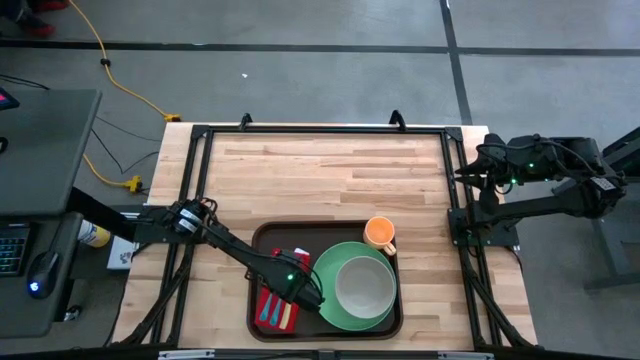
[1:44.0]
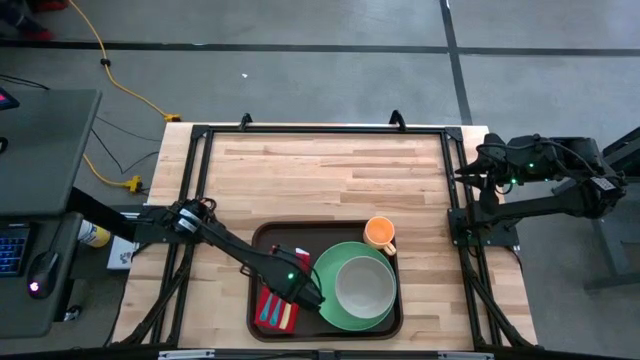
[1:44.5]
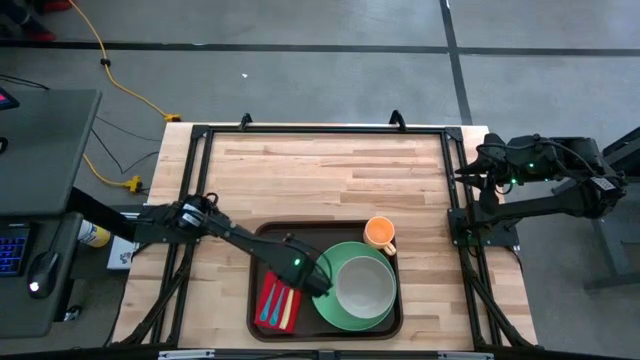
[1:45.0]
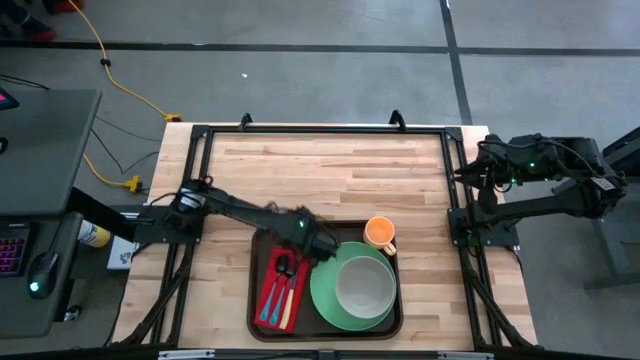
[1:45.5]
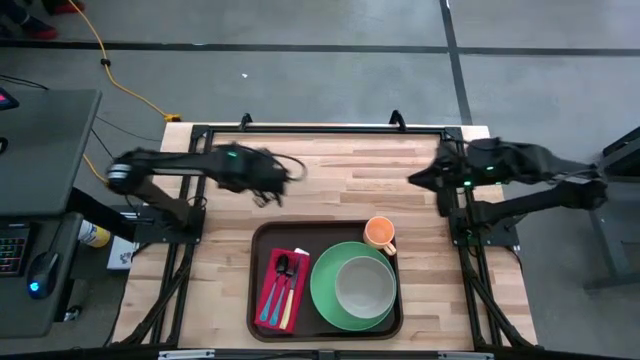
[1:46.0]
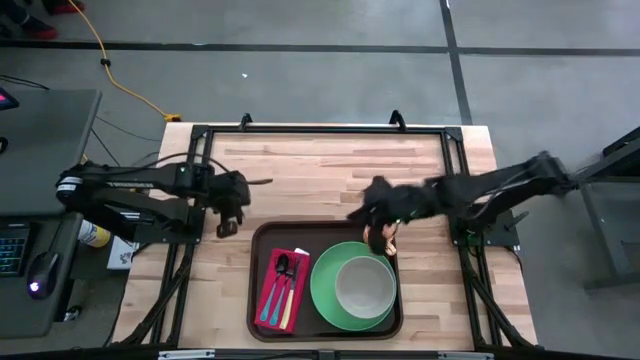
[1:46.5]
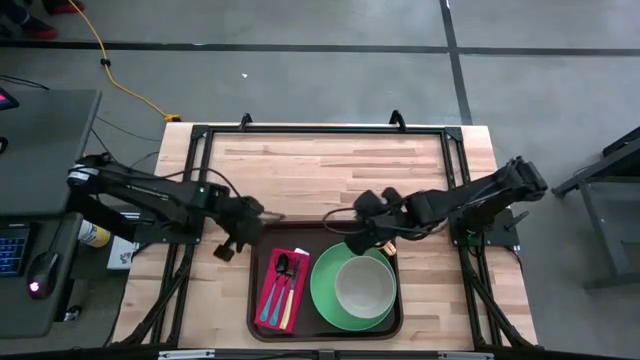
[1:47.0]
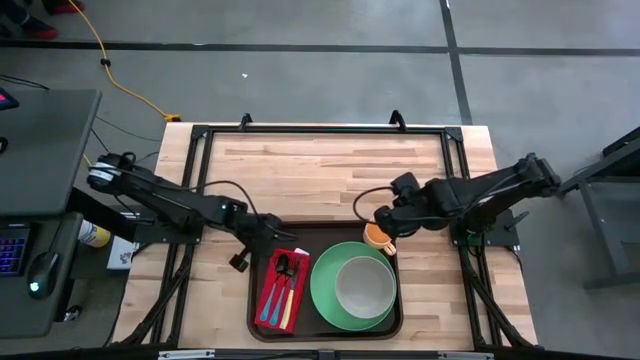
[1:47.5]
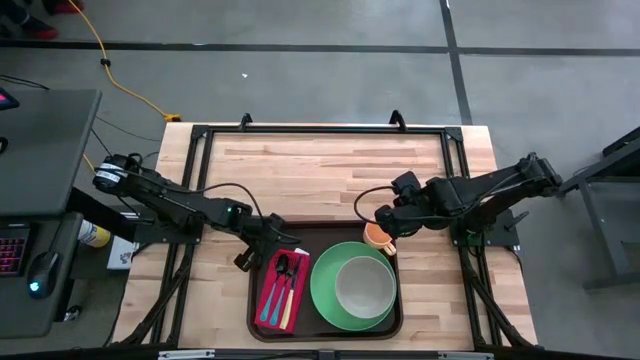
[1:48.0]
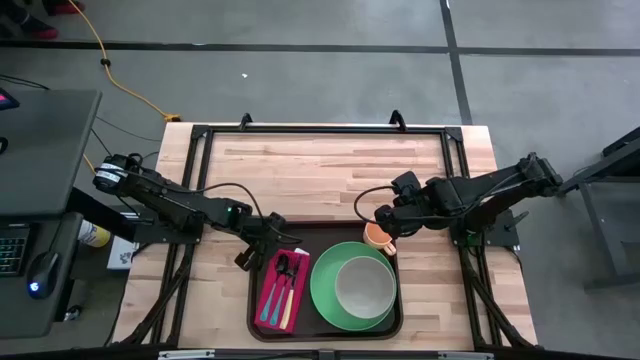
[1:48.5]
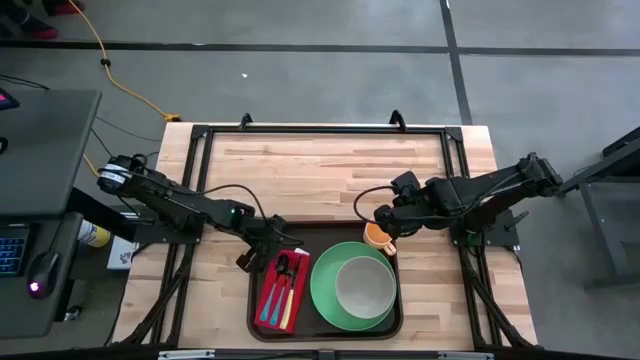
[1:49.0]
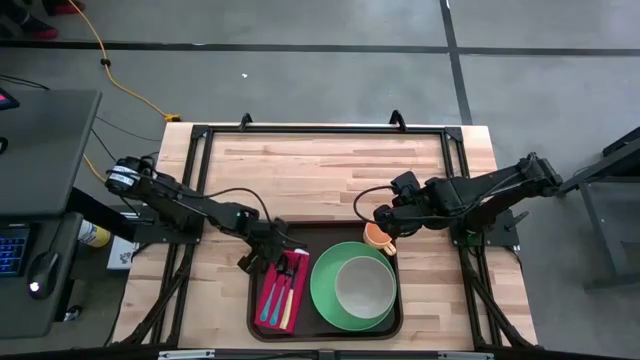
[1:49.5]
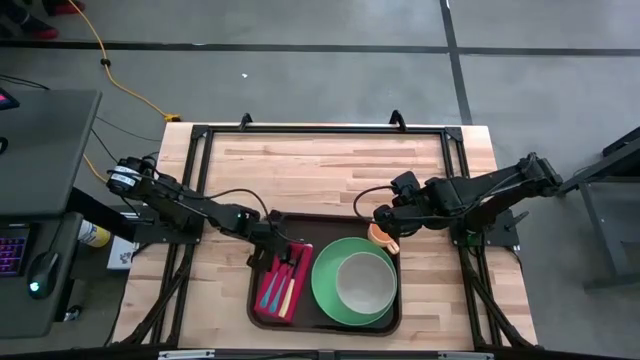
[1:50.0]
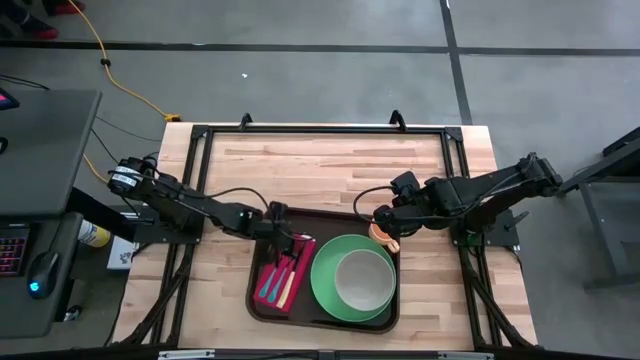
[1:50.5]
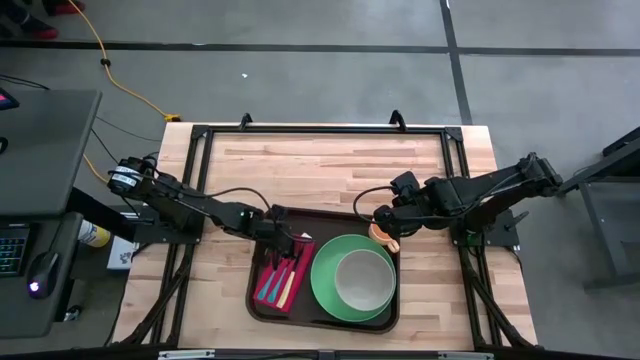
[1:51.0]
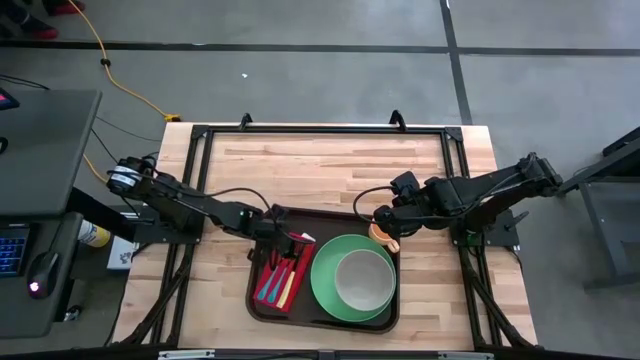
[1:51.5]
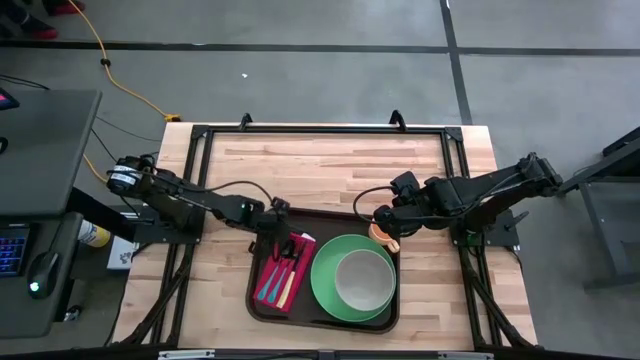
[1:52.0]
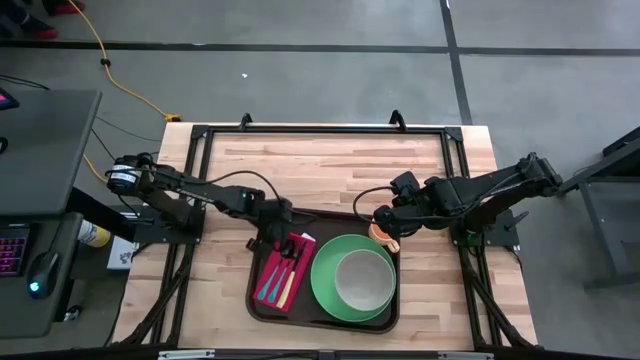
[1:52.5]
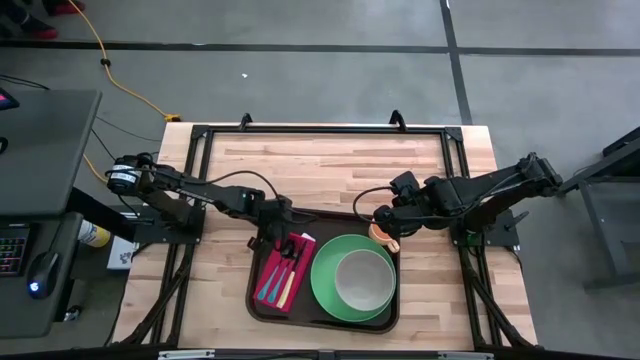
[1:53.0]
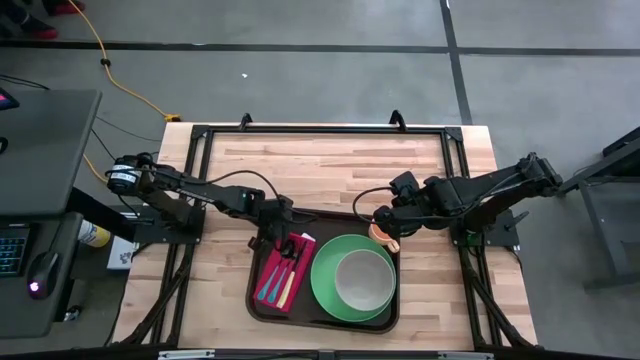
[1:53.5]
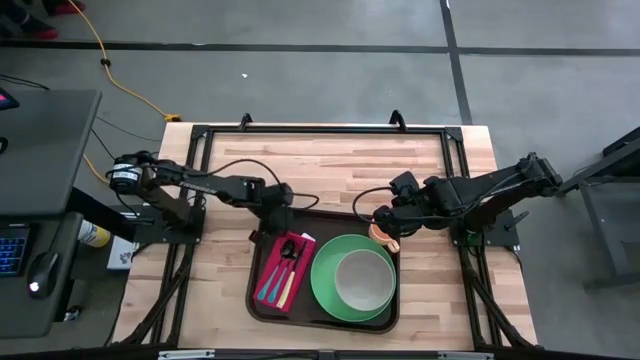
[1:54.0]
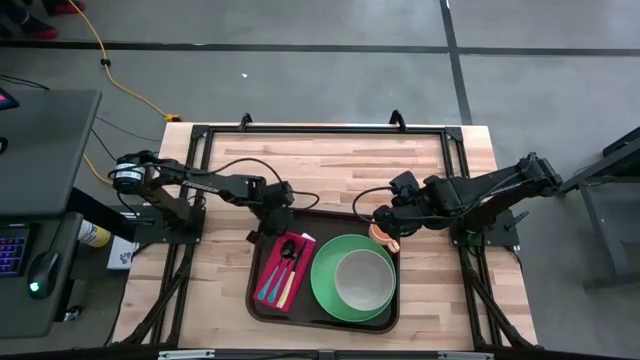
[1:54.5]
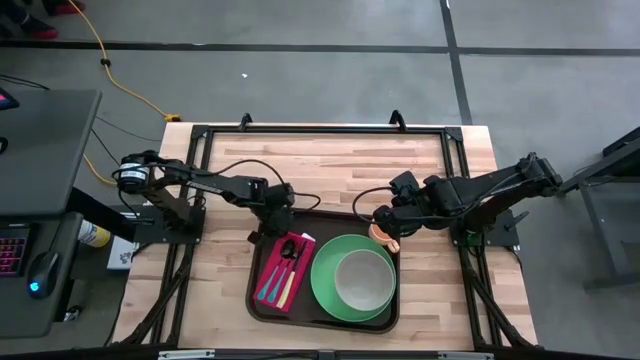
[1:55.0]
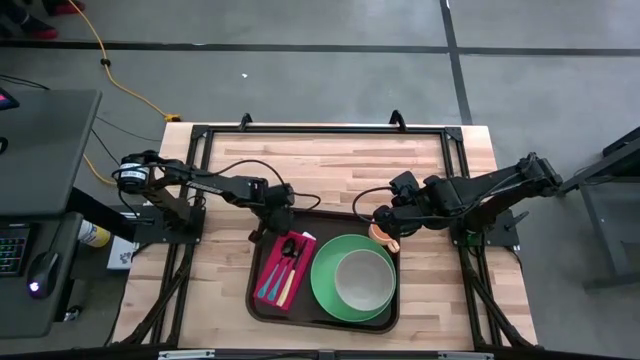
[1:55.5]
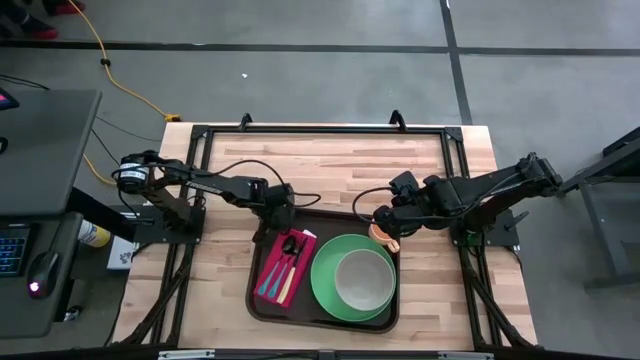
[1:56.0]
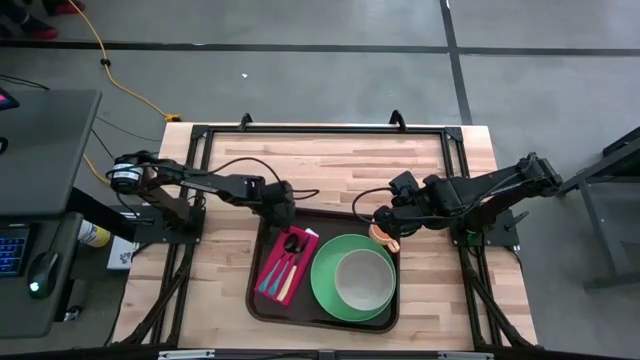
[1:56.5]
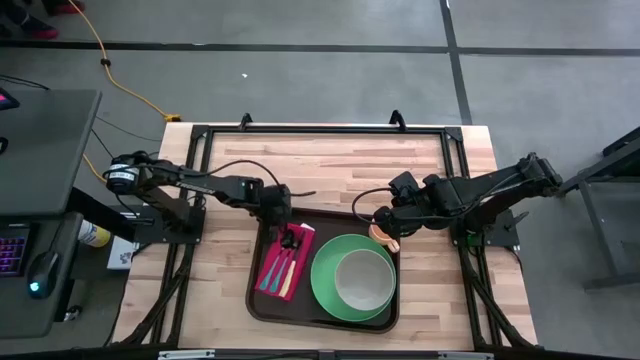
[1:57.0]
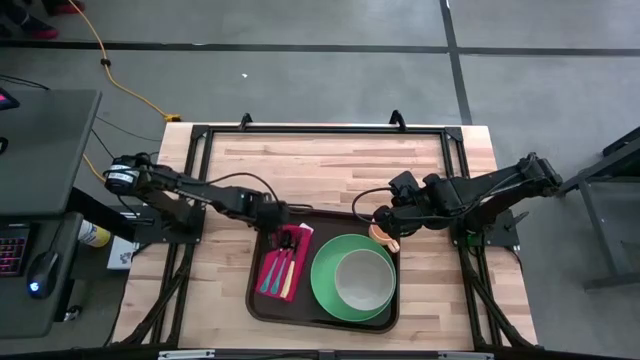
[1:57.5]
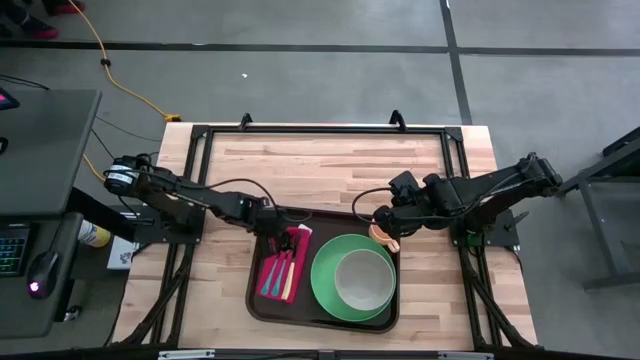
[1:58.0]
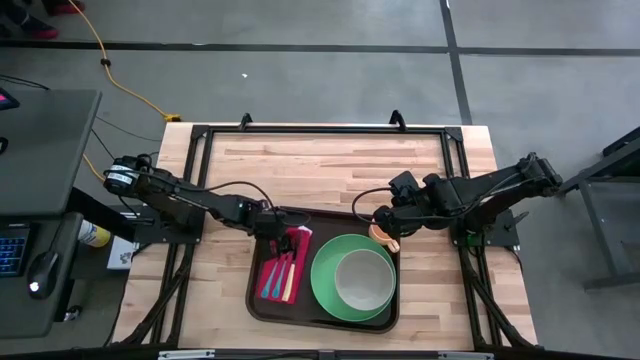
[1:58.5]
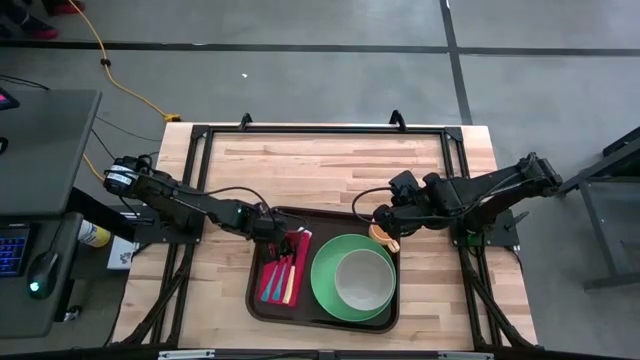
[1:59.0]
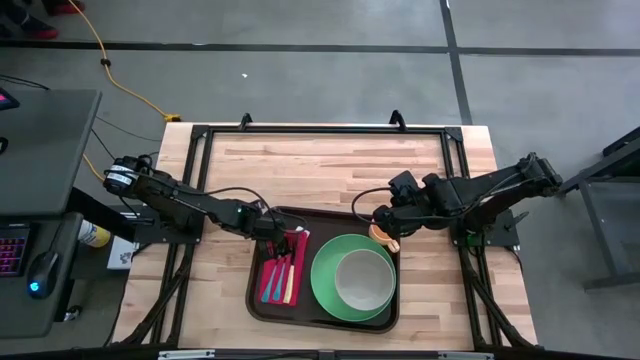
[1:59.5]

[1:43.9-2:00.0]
Task: Set up tray
Adjust the red napkin on the black serving tray

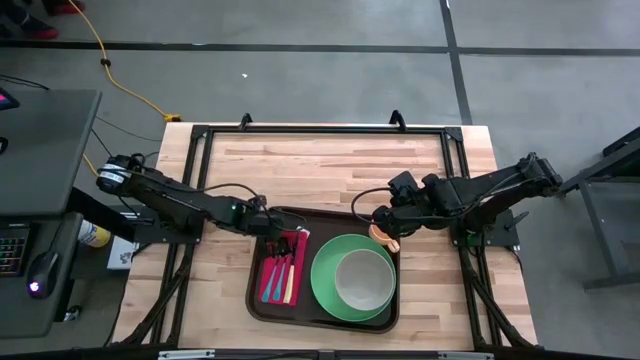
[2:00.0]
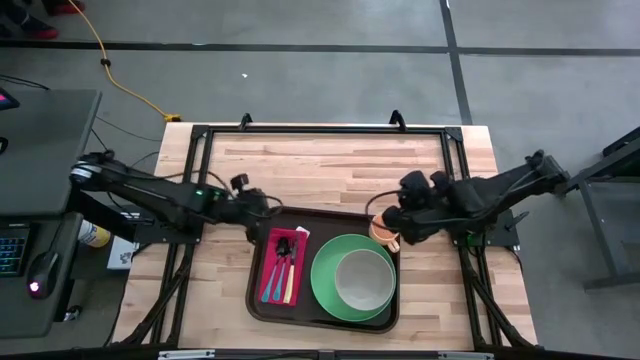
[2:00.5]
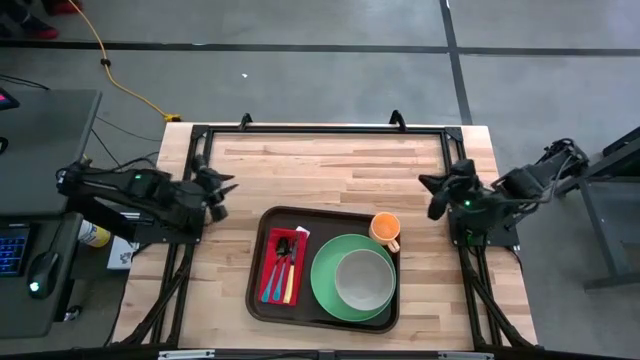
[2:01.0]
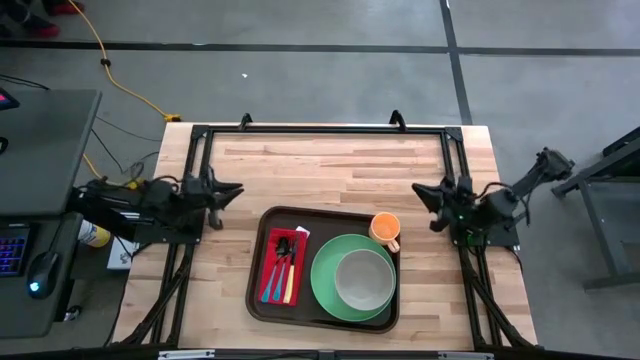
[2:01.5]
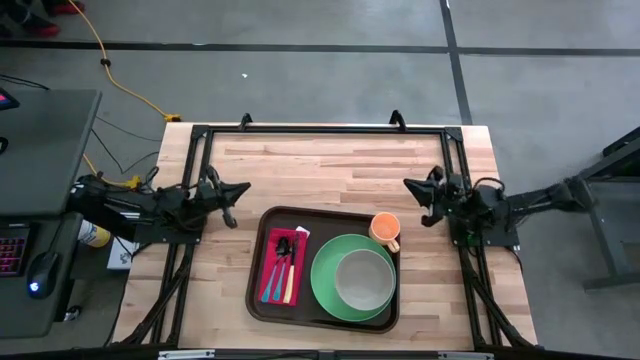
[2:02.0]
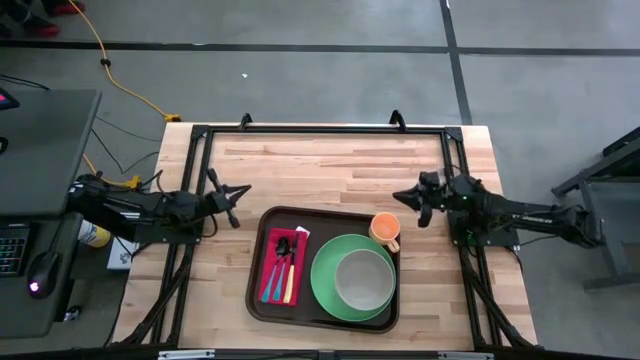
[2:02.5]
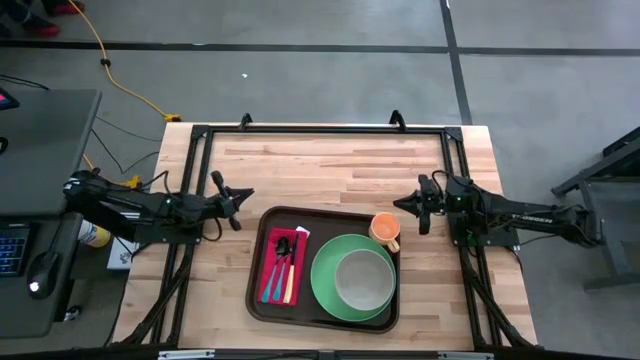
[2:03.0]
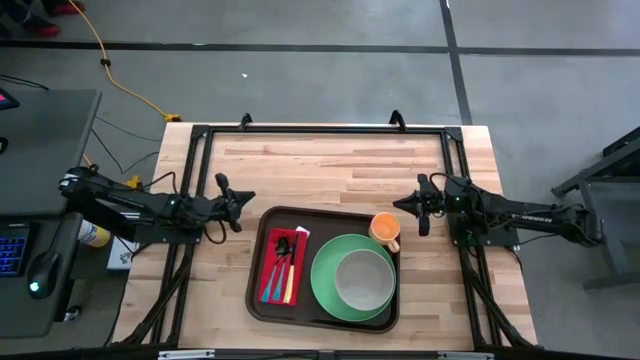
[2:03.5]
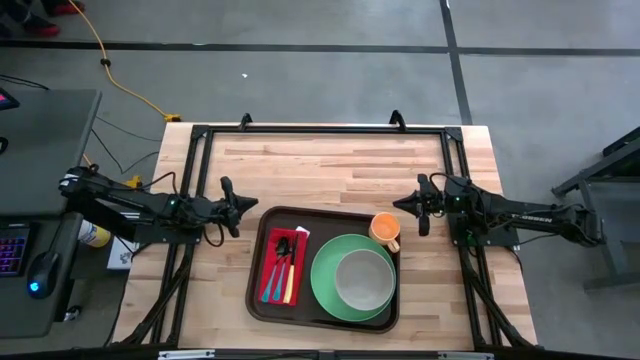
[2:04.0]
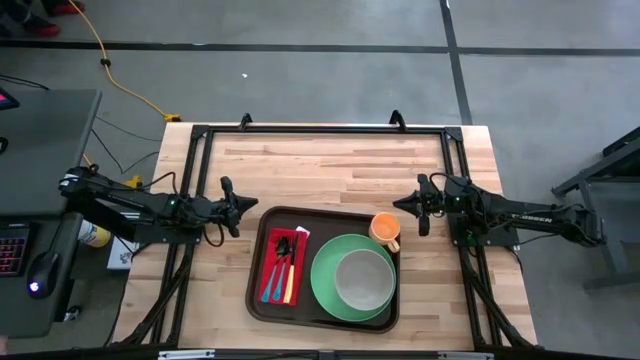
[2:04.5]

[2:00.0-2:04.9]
Return to Home Position
